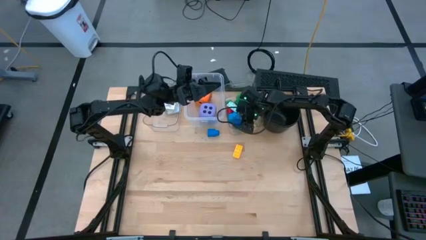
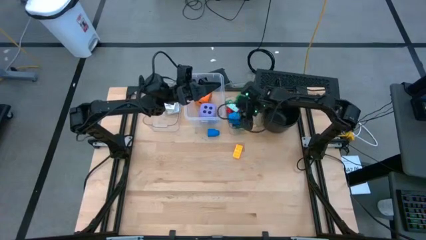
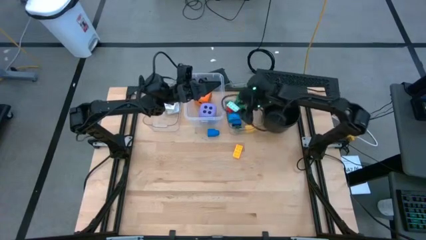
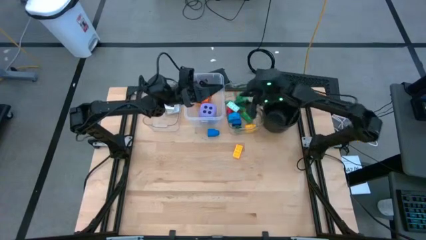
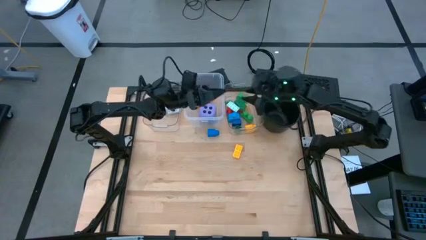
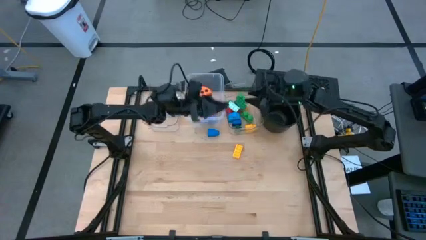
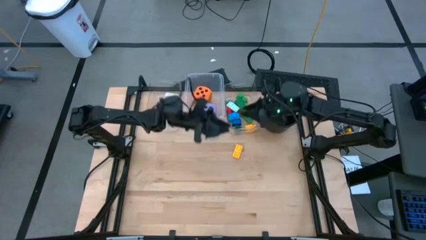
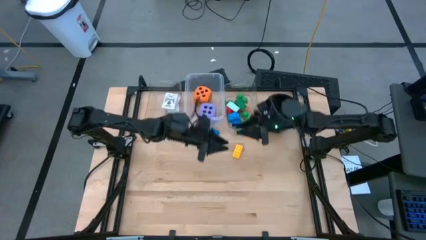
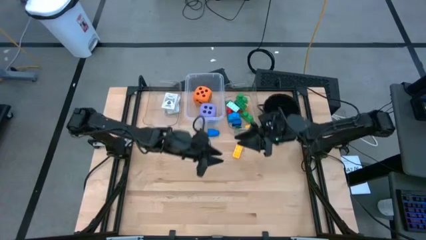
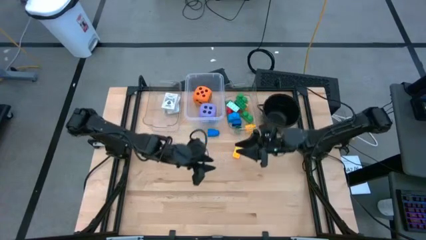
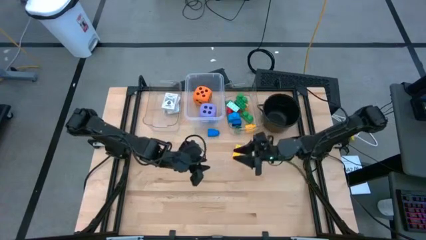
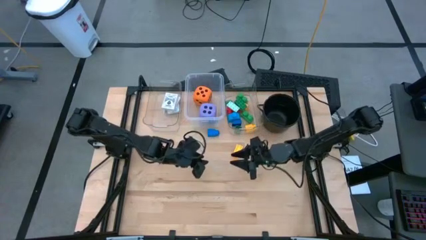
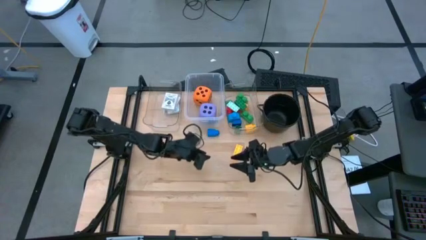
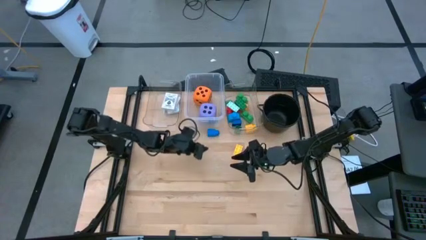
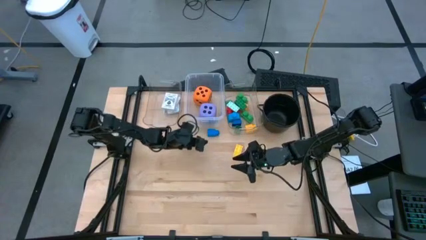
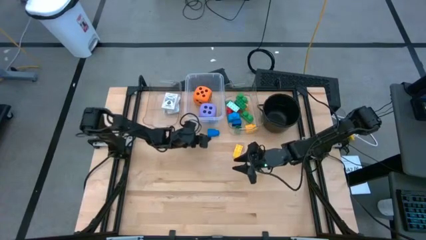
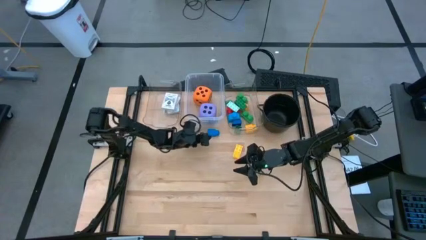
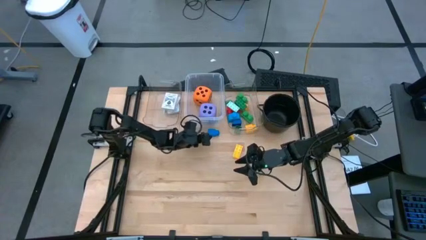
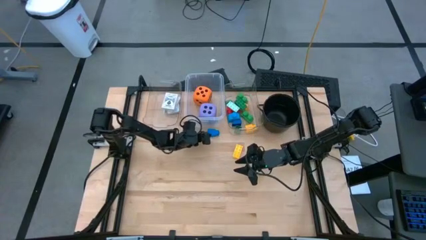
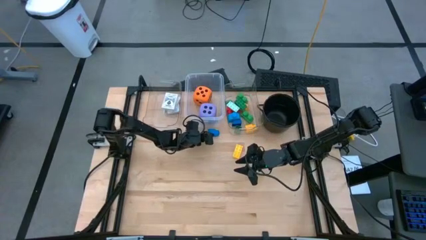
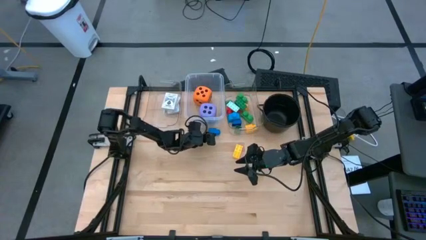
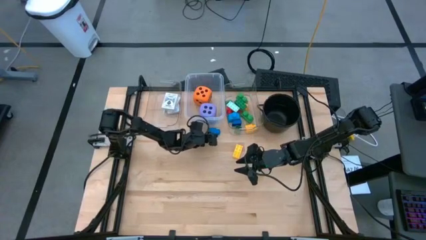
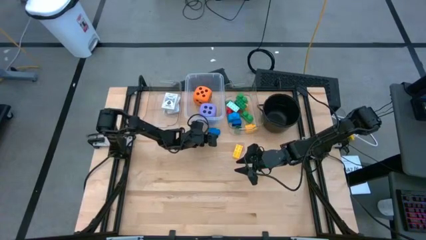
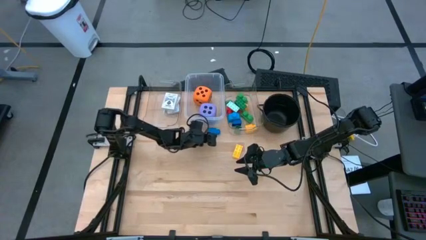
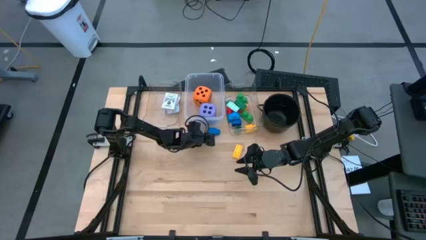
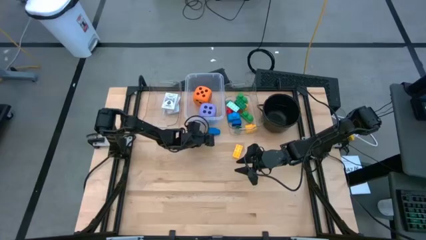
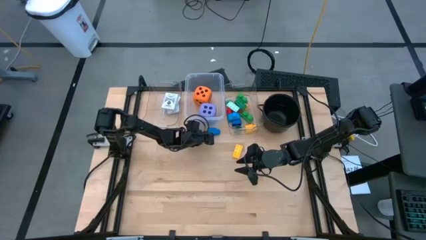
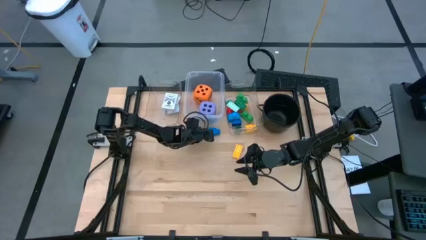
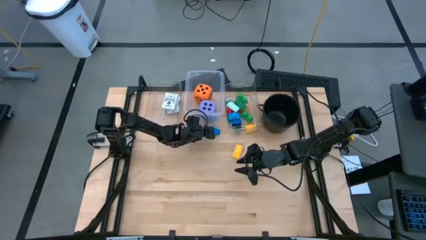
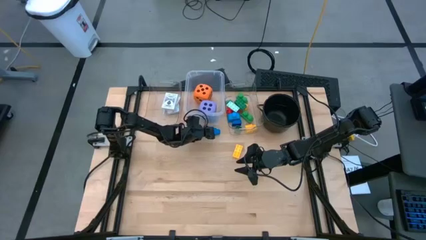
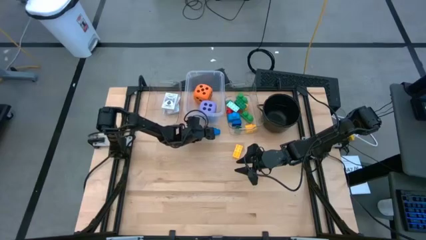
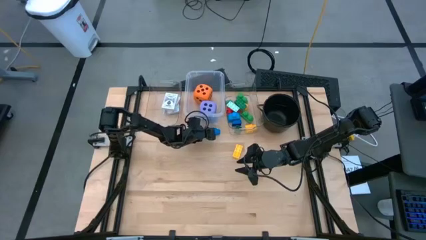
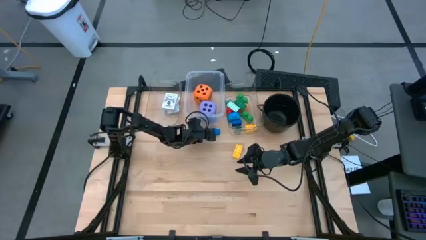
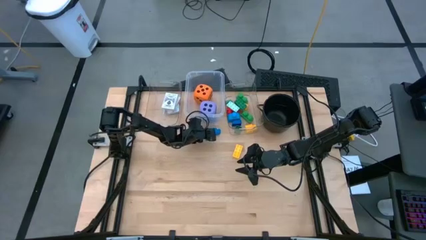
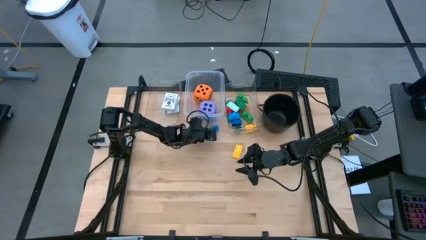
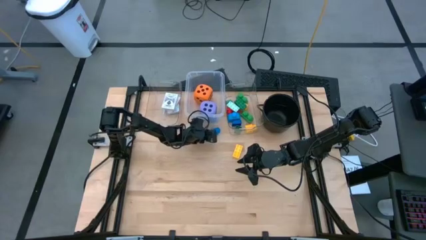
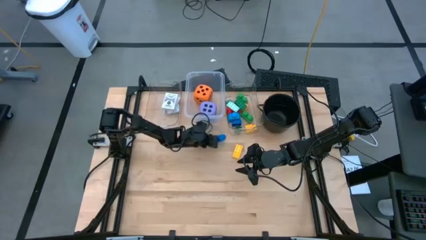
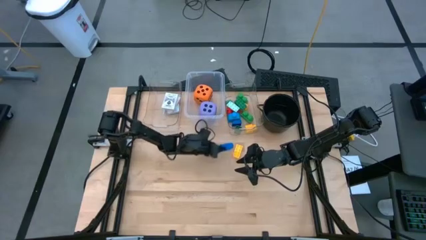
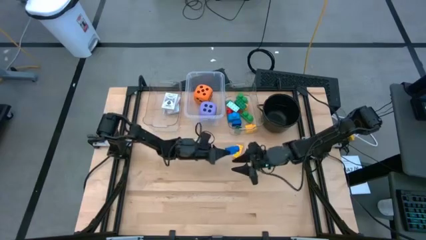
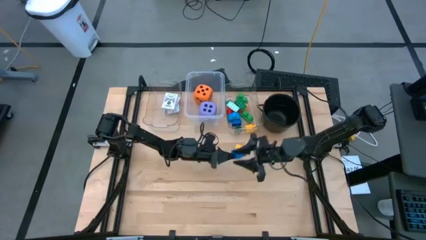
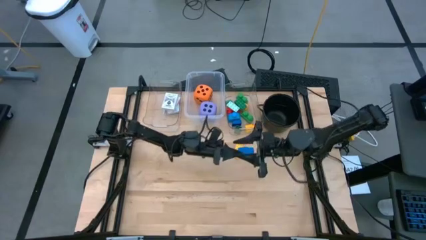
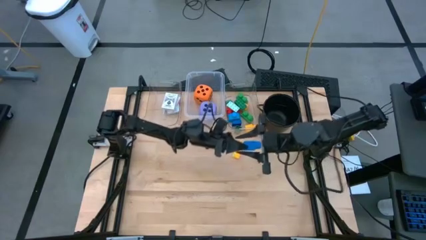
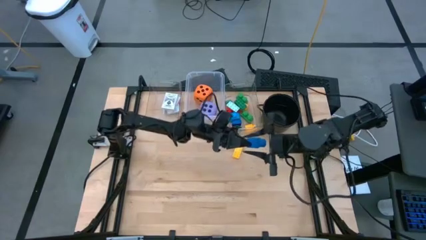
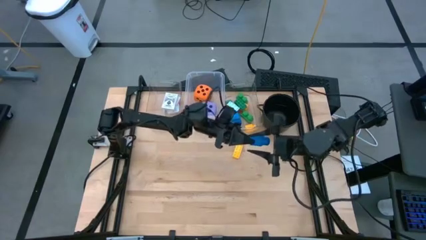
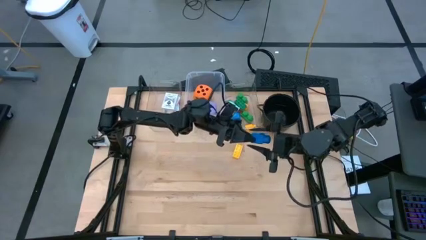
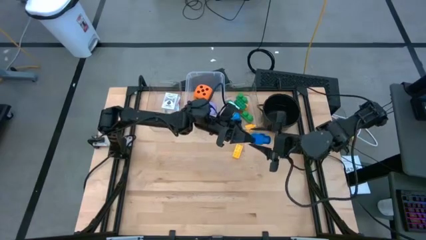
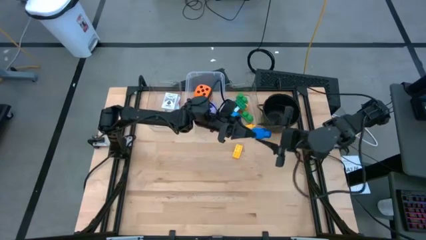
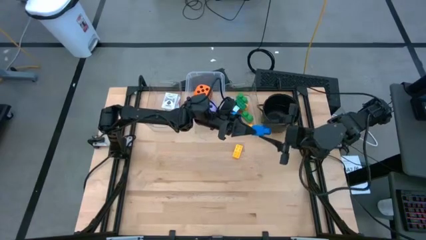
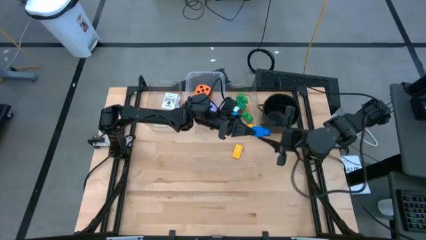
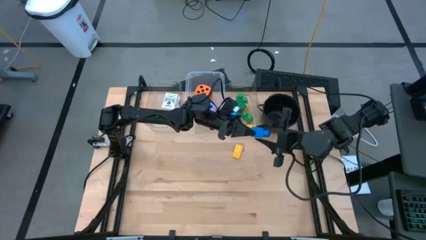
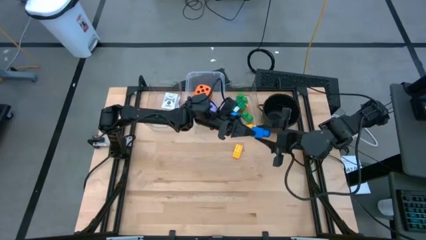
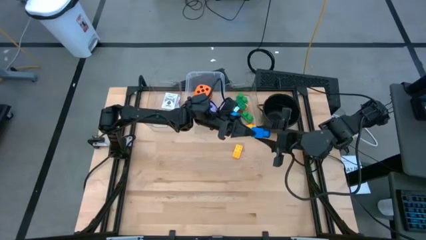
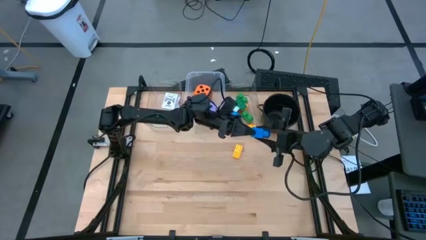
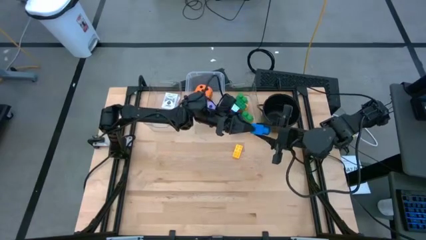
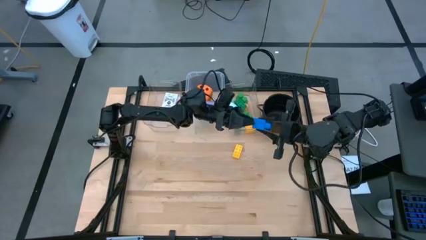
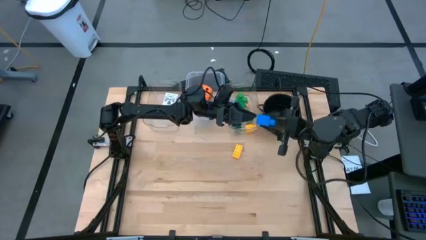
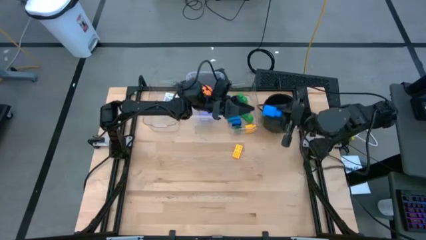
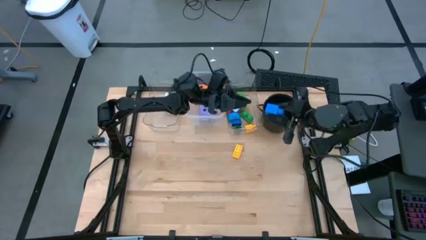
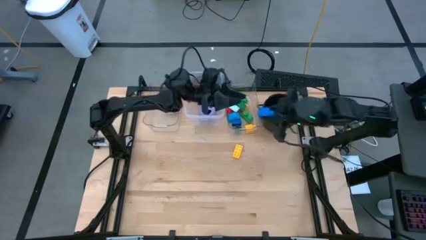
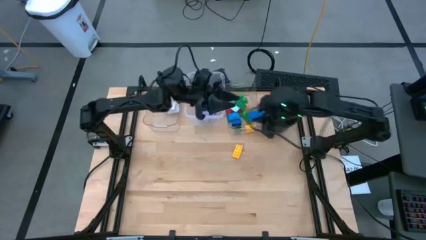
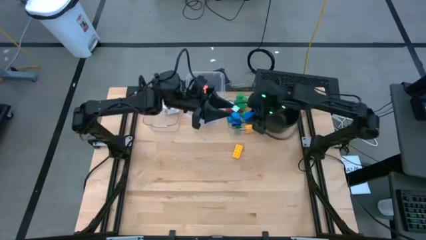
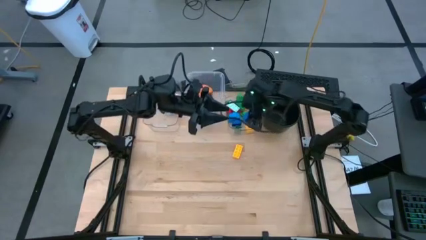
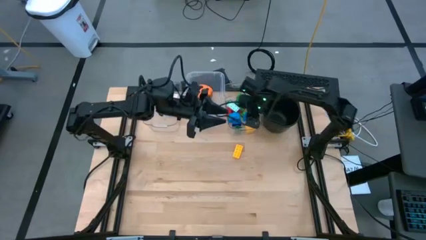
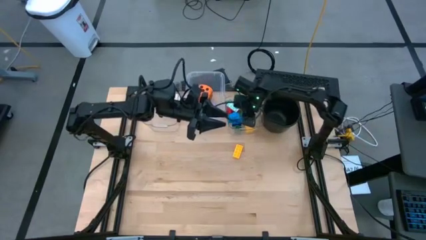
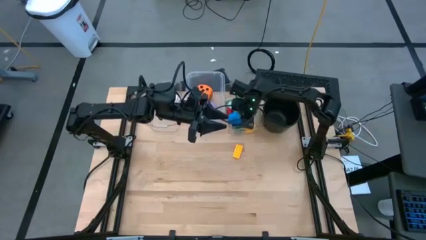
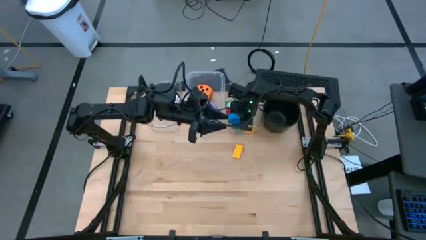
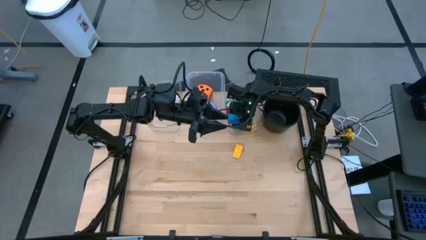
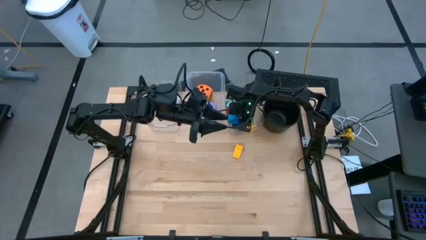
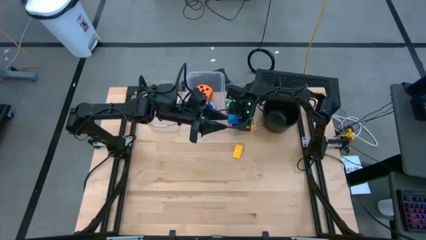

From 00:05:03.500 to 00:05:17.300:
Task: Pick & Place Toys
Put the blue game piece into the right transparent bin
